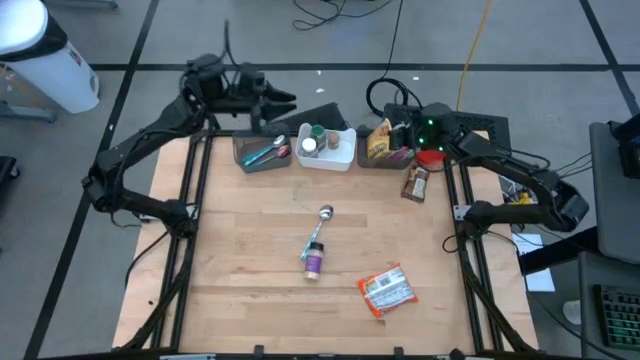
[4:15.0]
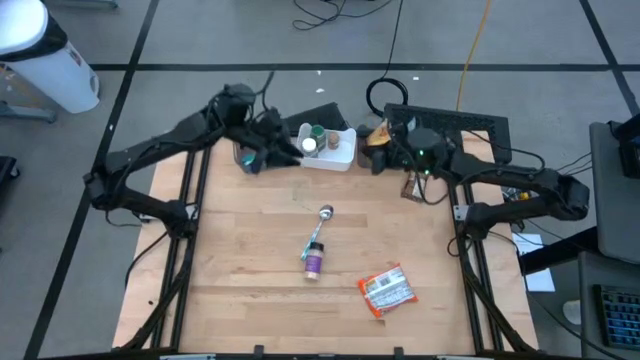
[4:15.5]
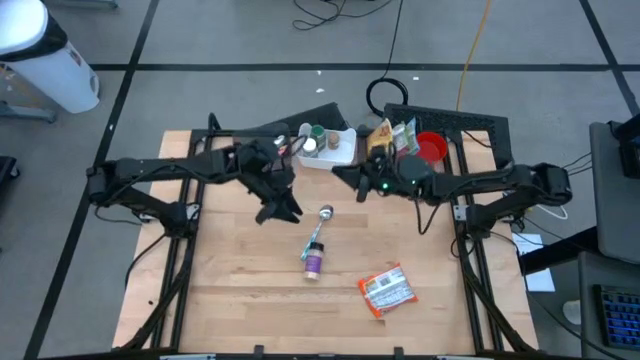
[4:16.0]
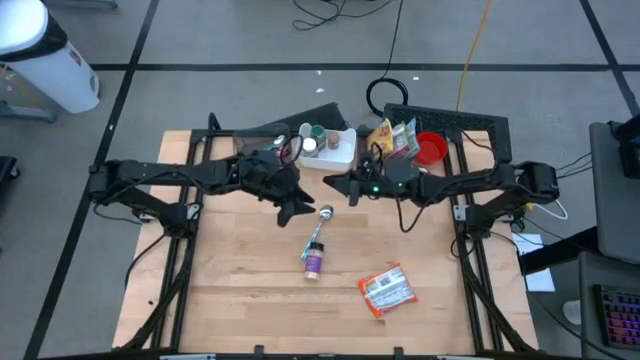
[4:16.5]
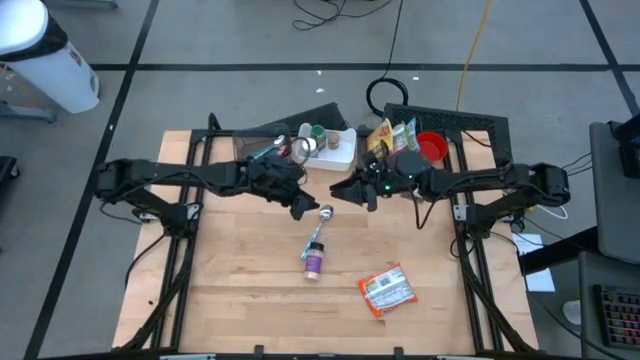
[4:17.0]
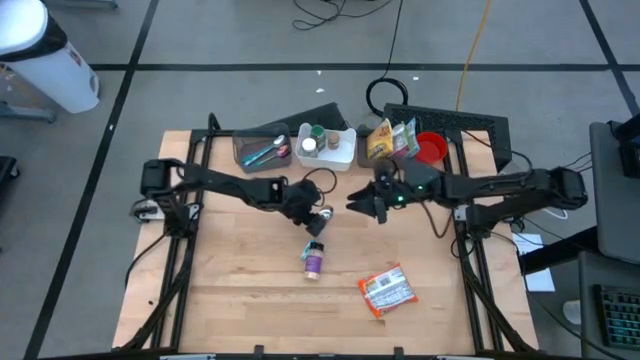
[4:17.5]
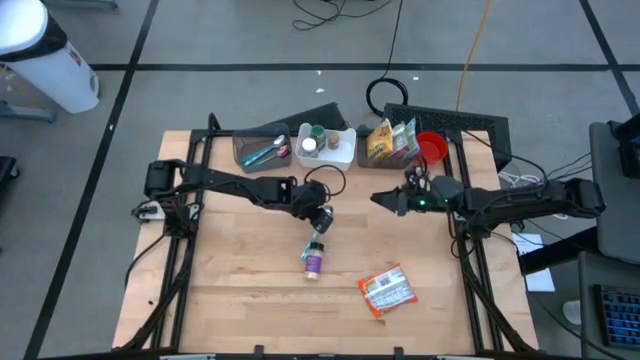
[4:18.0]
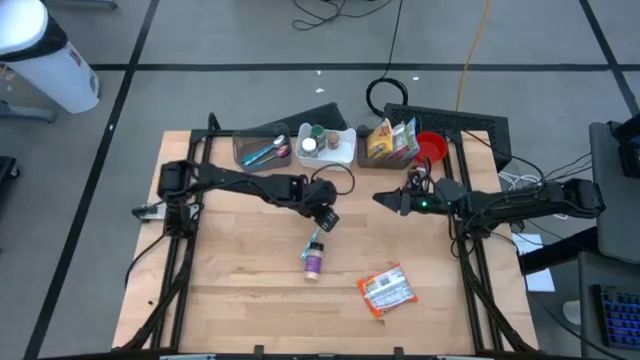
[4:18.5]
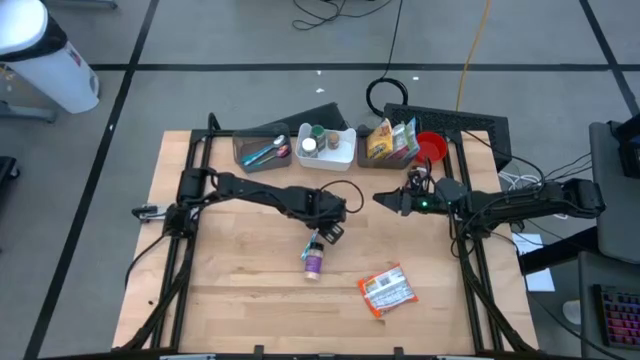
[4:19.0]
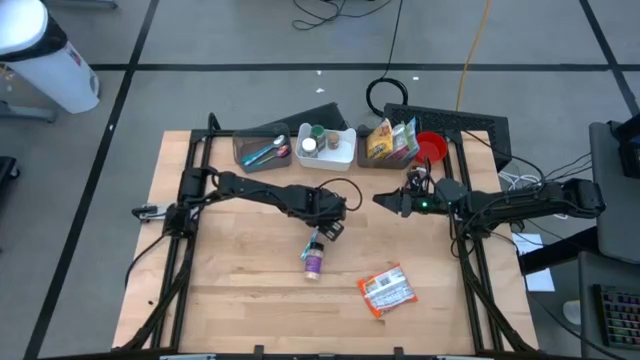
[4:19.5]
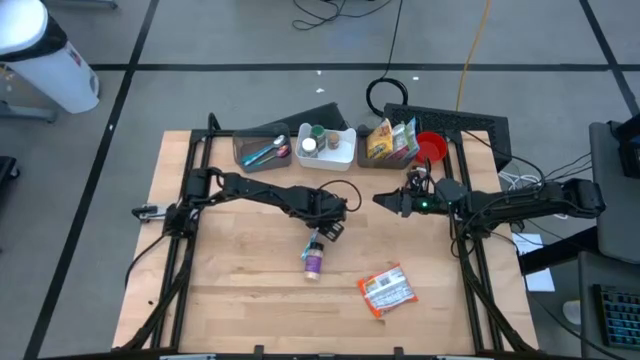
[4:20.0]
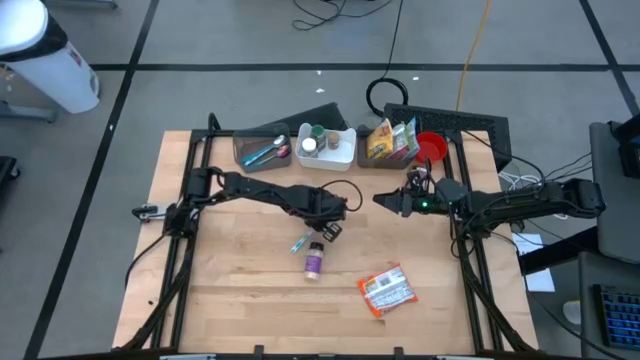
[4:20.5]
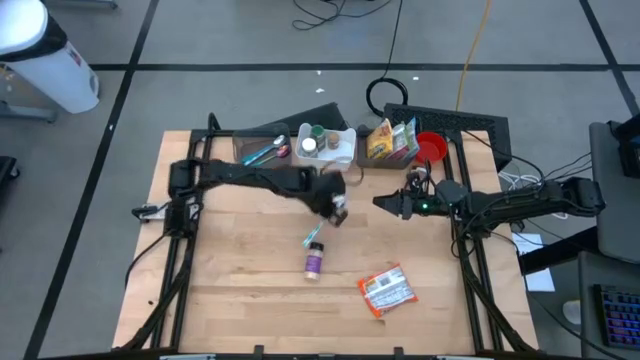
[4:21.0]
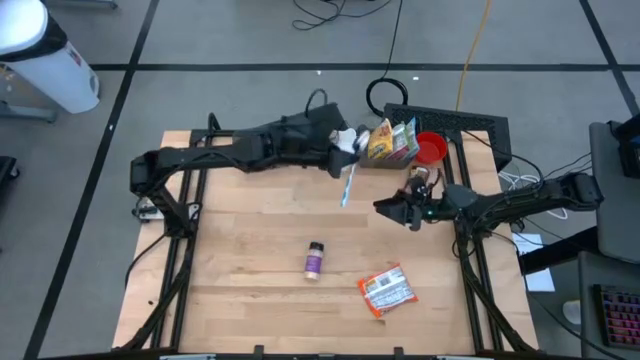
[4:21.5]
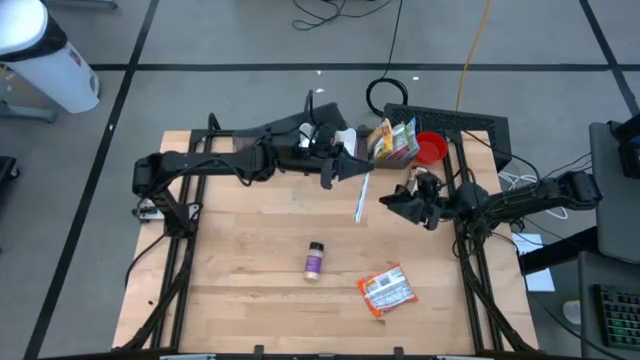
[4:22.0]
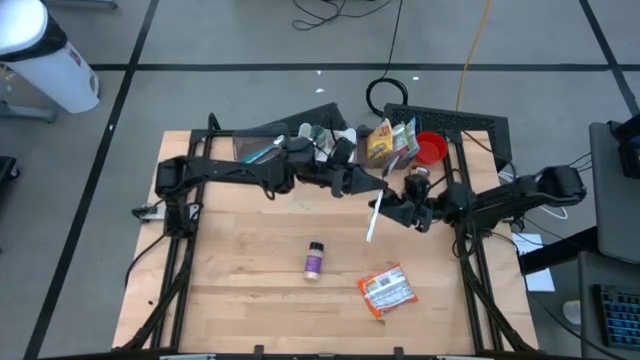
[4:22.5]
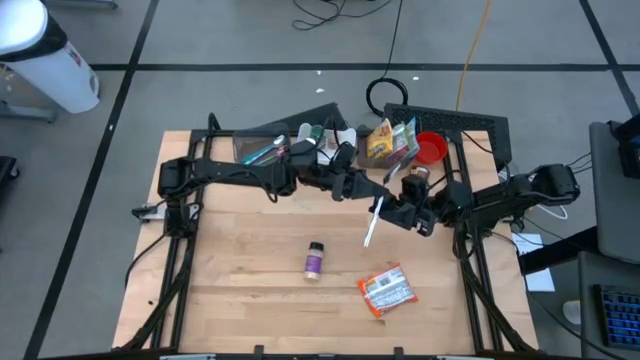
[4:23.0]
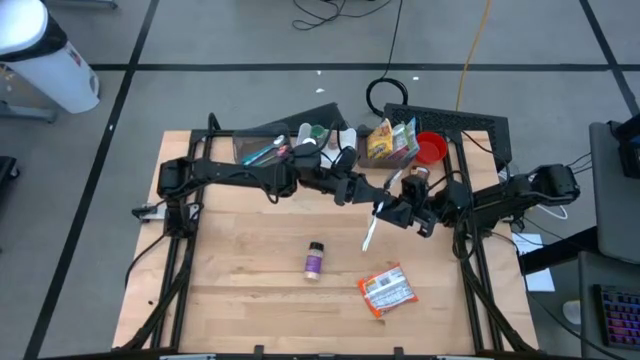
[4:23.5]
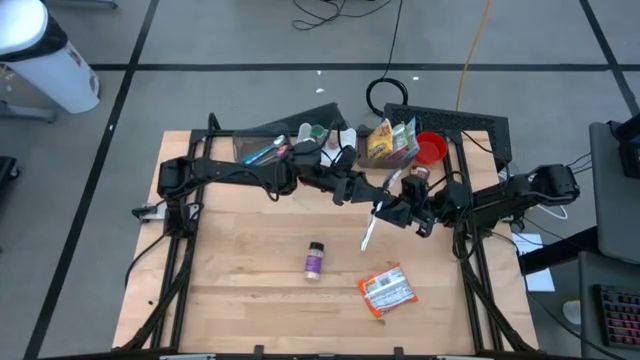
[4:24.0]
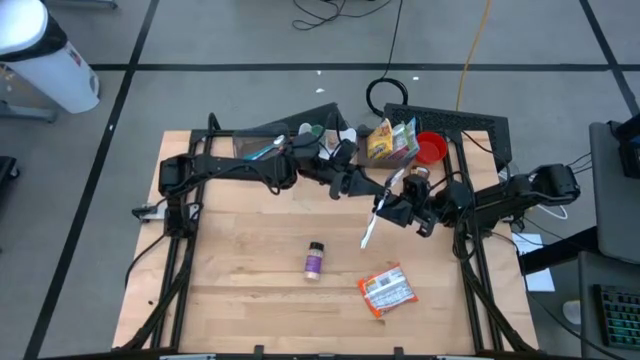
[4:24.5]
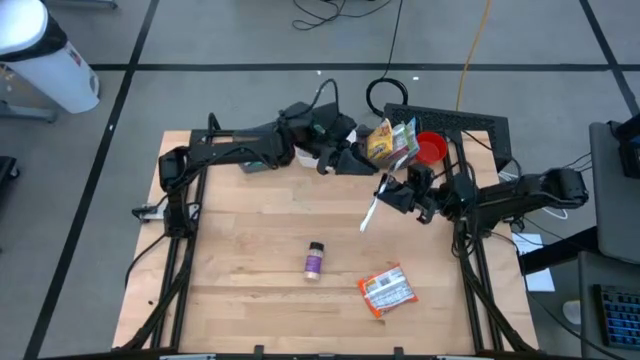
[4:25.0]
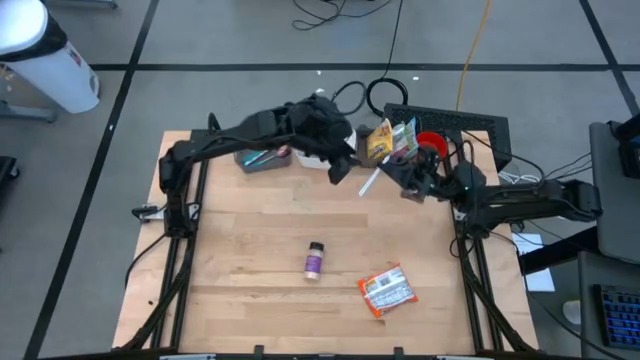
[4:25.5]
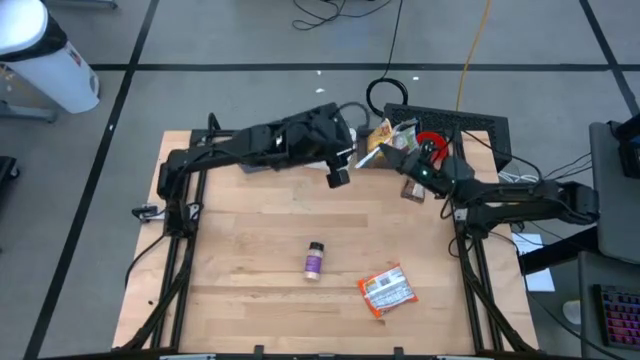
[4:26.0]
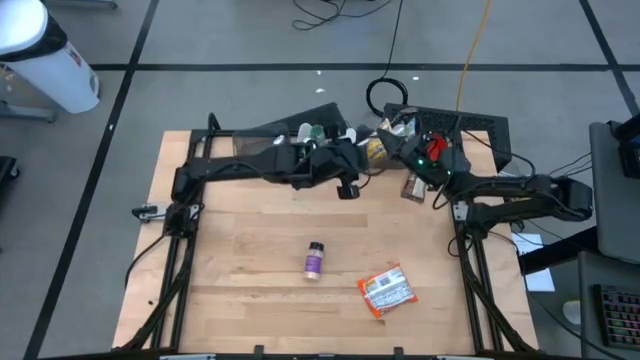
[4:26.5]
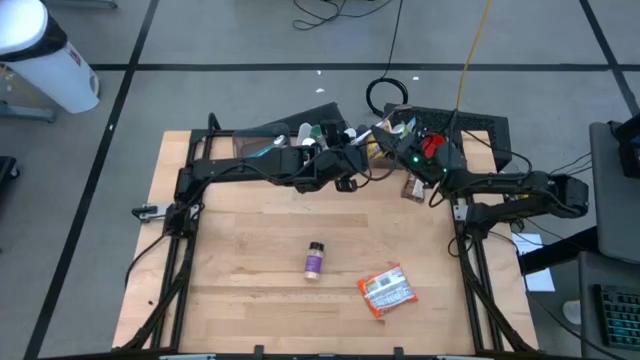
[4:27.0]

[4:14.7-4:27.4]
Task: Pick & Place Food Item
Put the blue patterned spoon into the left black bin

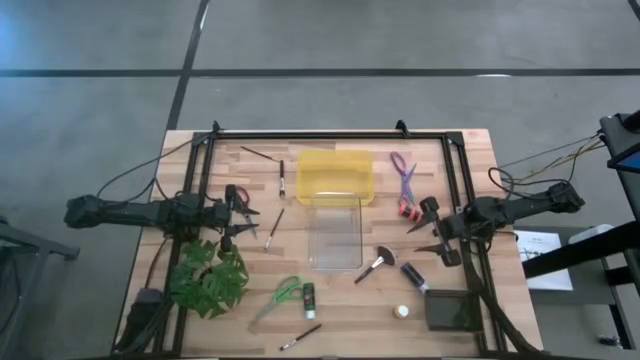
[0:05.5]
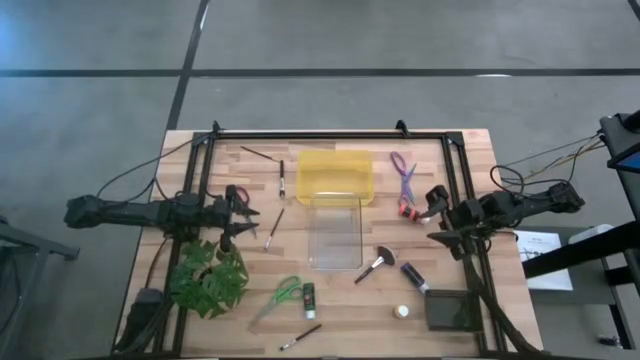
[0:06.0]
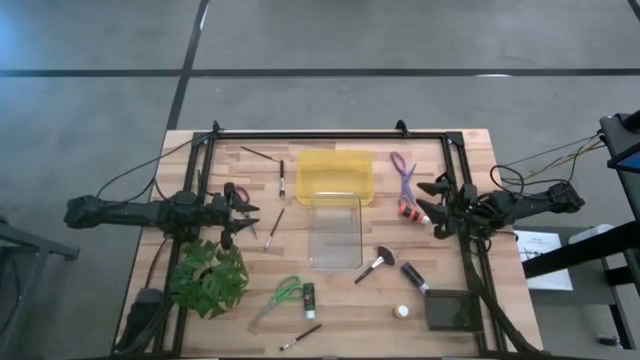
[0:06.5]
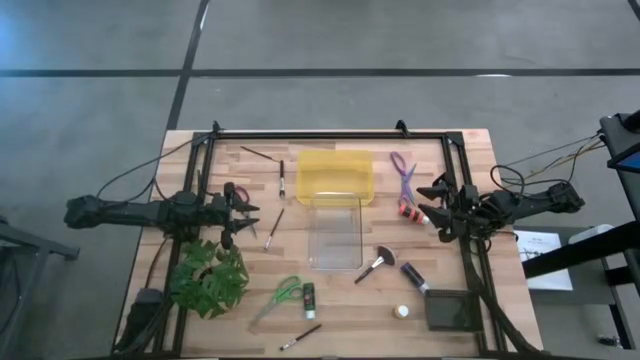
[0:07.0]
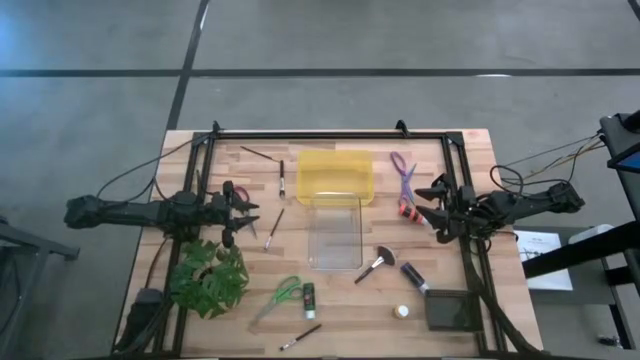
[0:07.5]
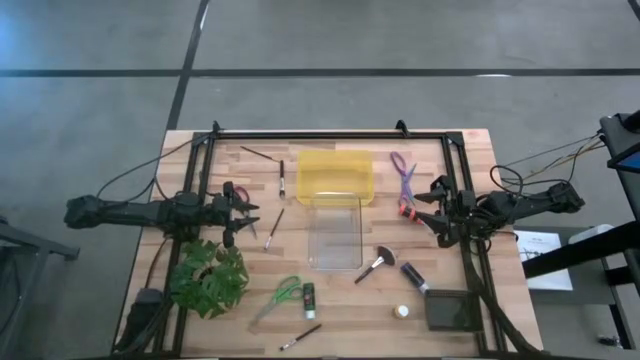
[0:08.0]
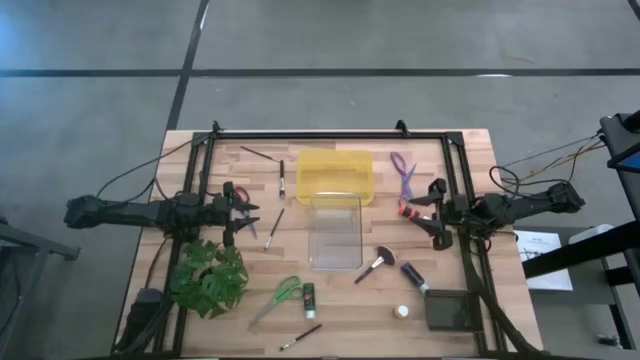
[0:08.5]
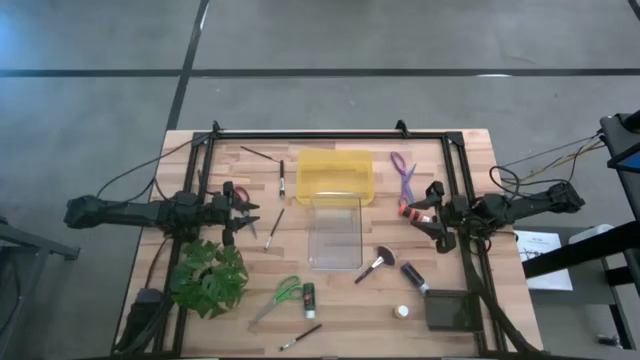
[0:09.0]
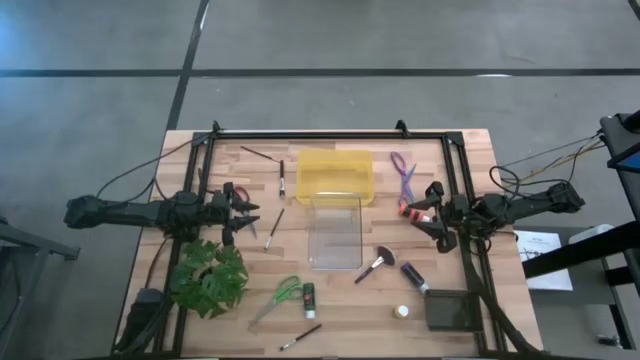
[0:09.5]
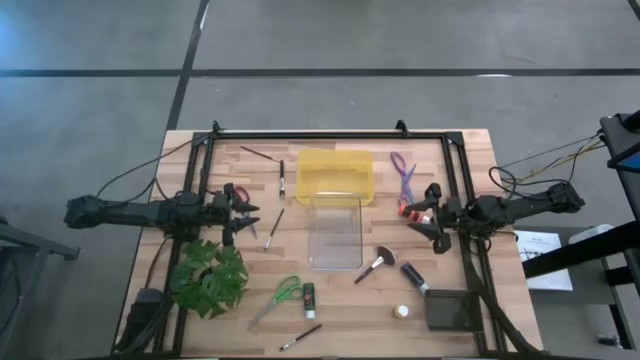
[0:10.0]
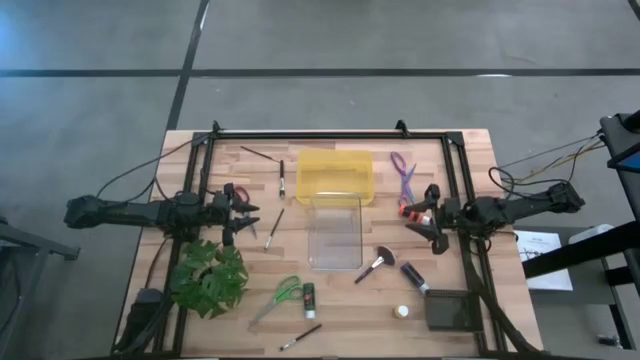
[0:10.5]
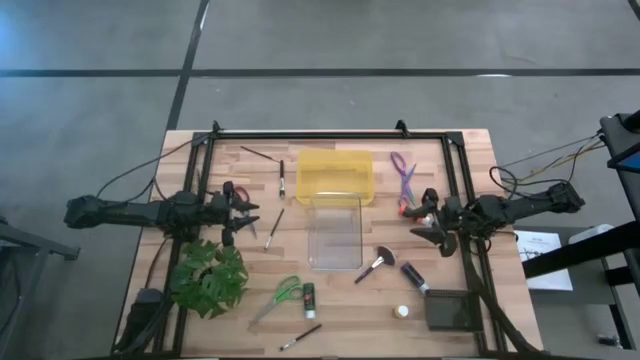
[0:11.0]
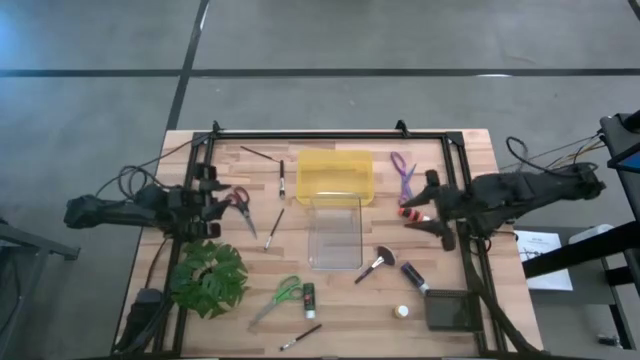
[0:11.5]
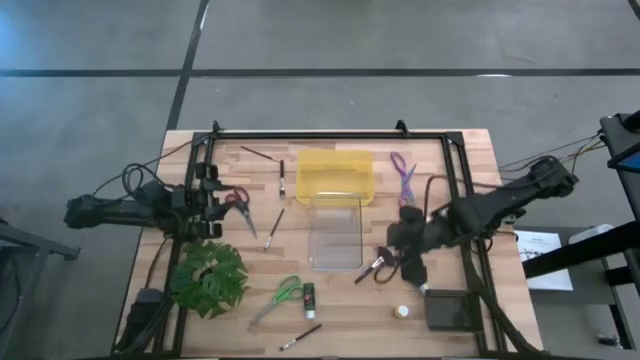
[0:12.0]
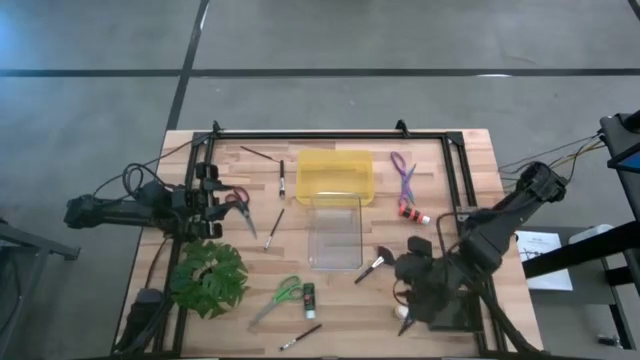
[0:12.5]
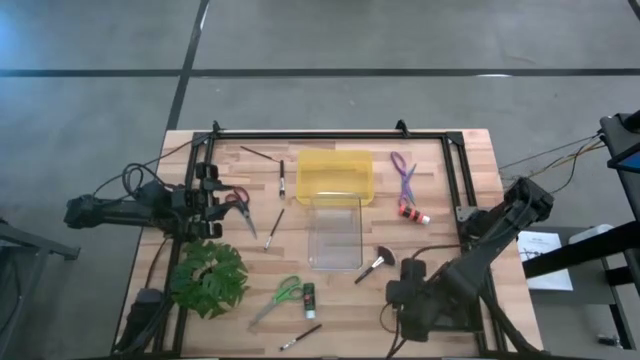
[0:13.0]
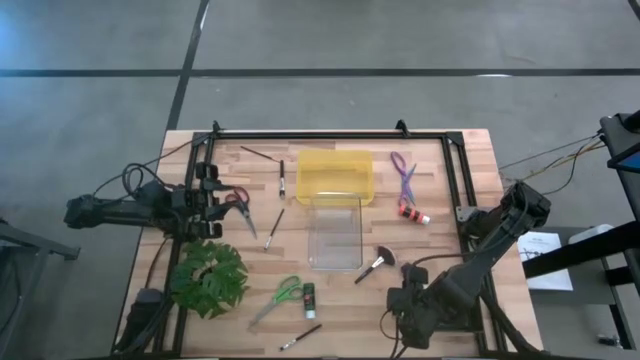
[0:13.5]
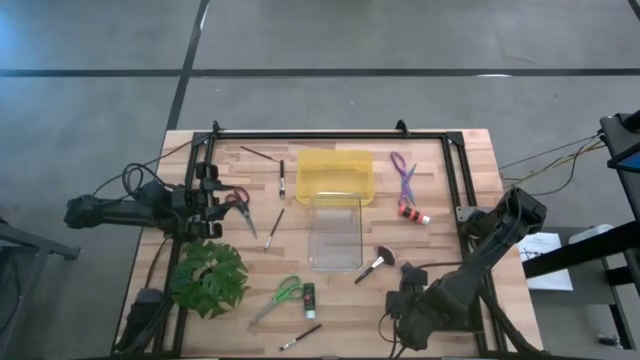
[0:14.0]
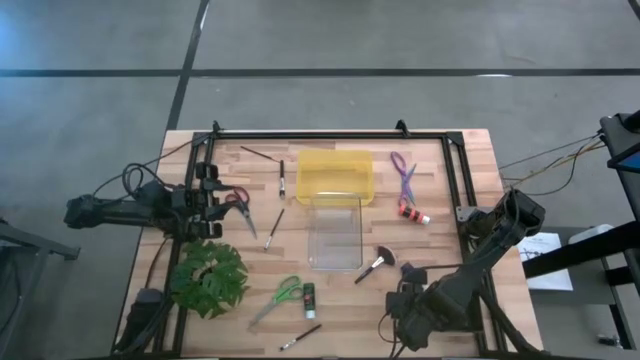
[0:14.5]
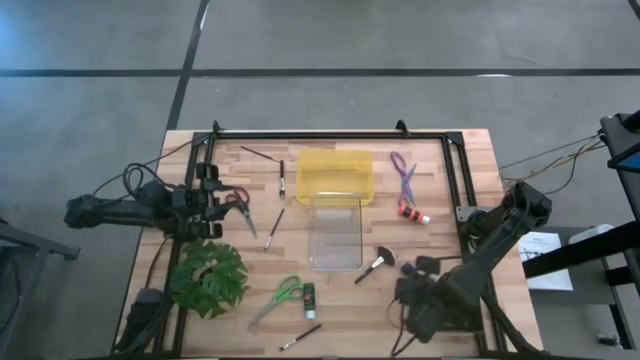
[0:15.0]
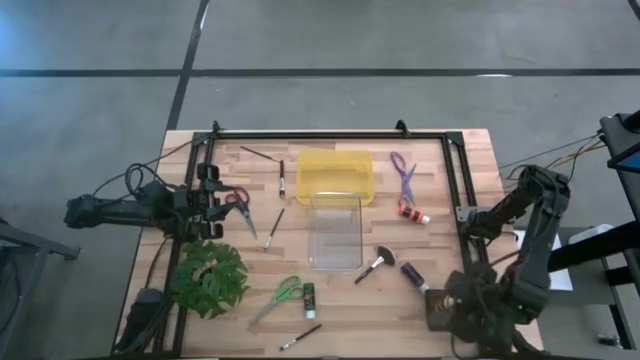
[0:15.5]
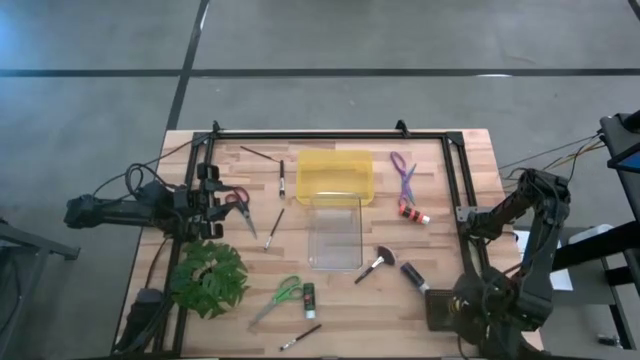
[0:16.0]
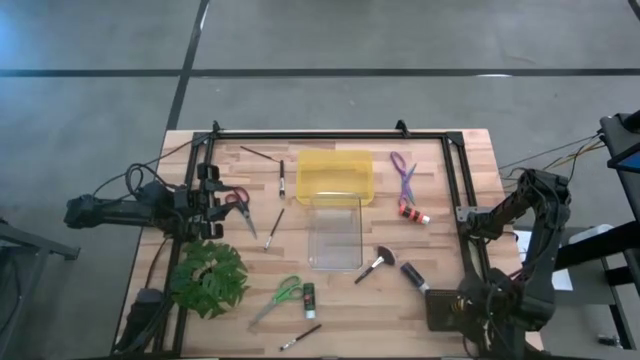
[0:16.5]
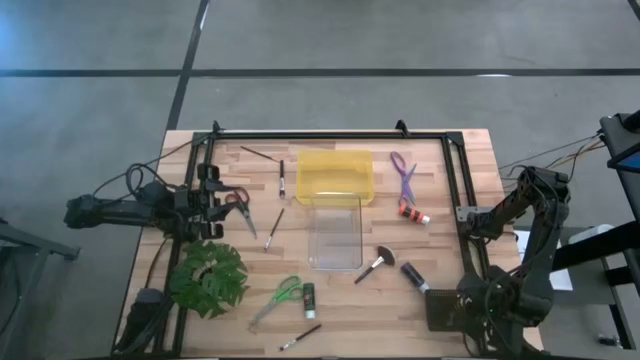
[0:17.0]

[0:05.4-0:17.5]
Task: Pick & Place Paint Supplies
Put the yellow paint bottle into the black bin
